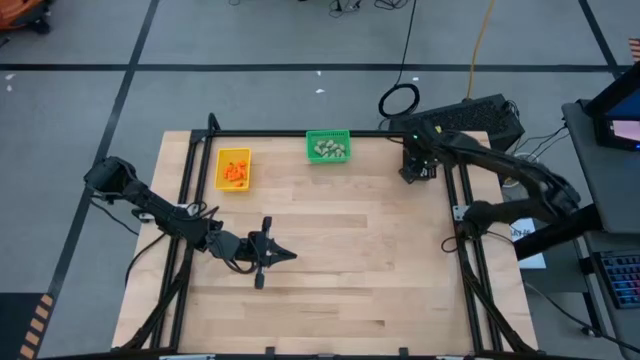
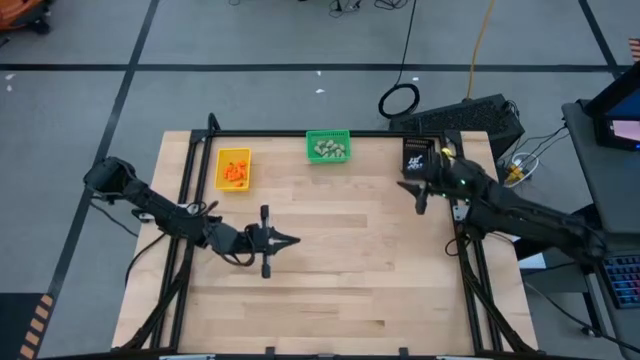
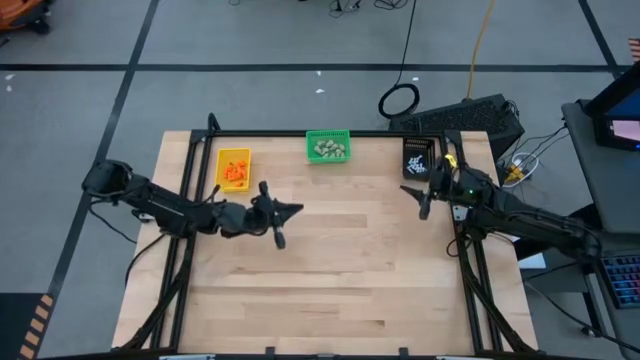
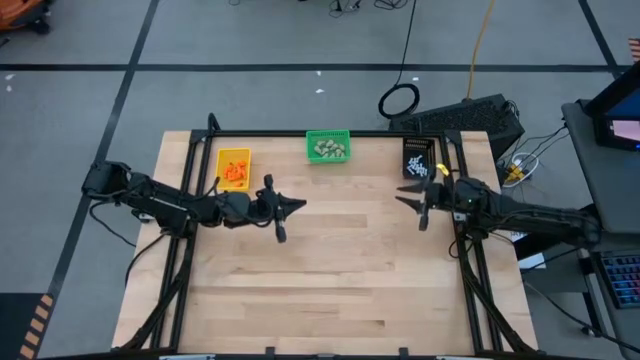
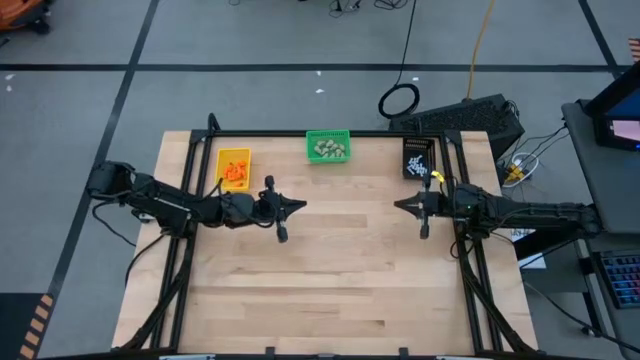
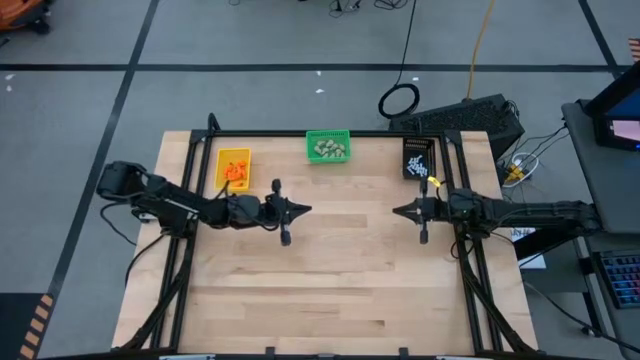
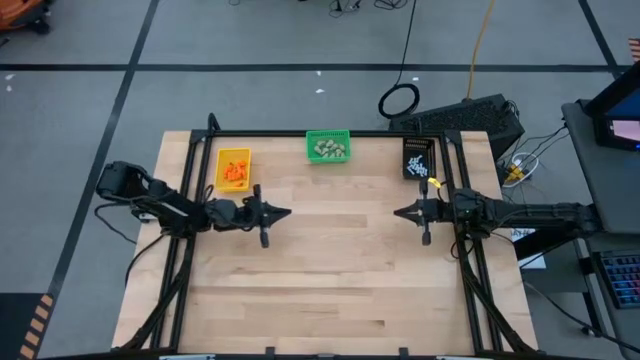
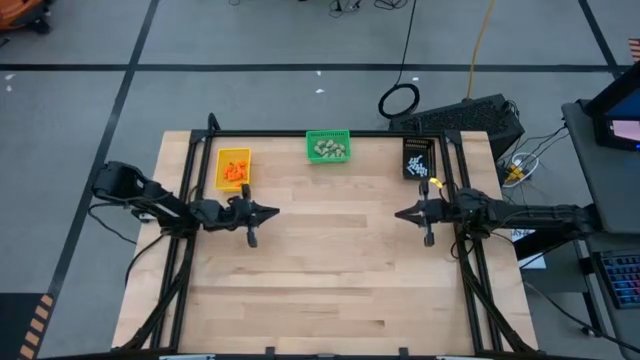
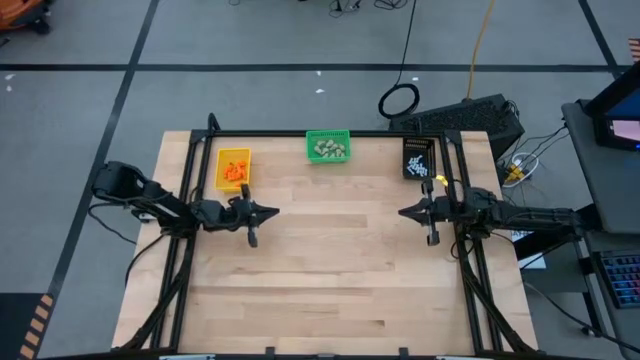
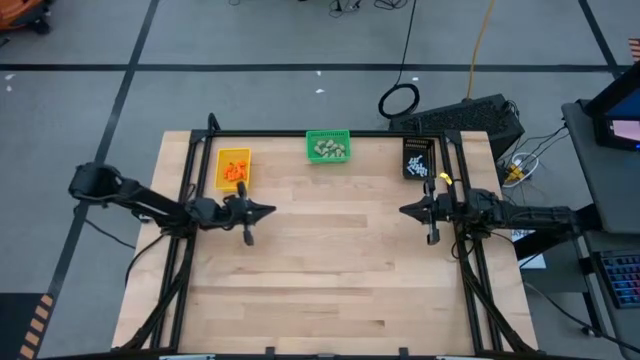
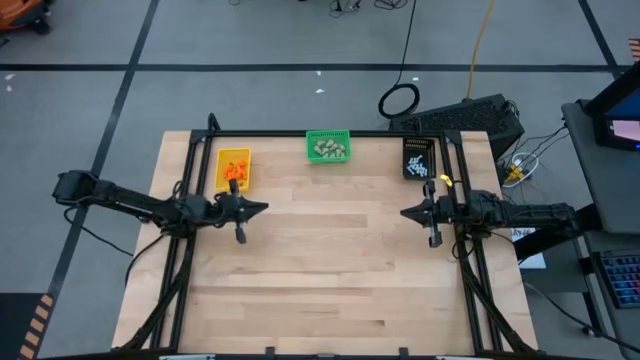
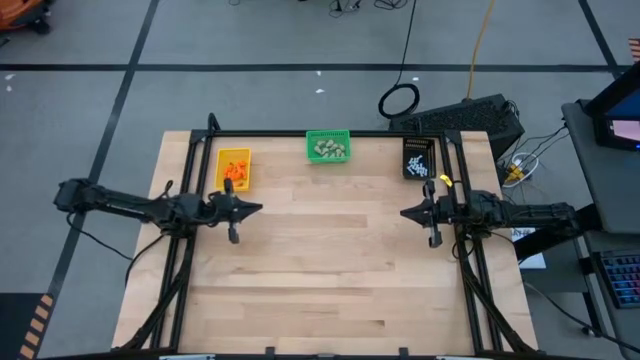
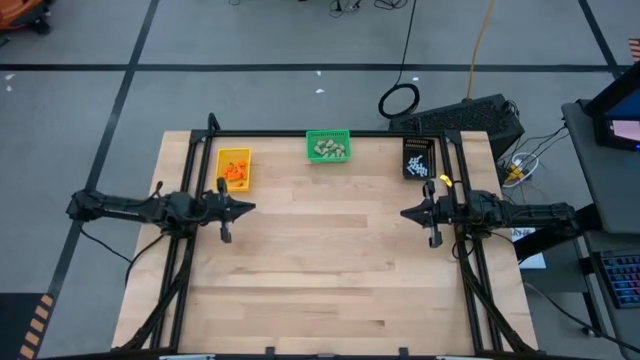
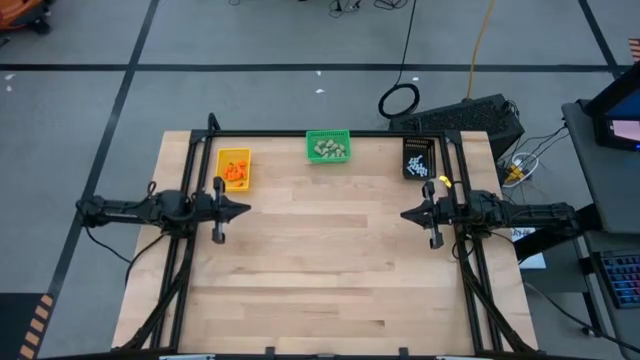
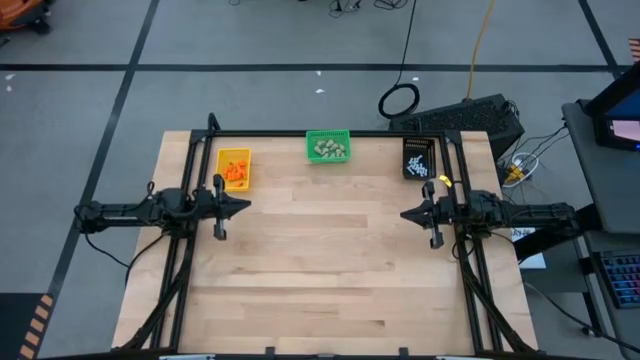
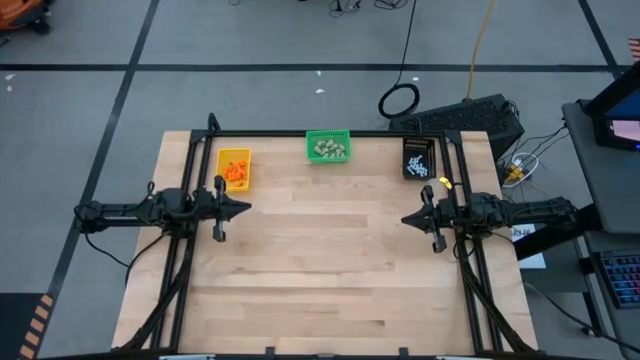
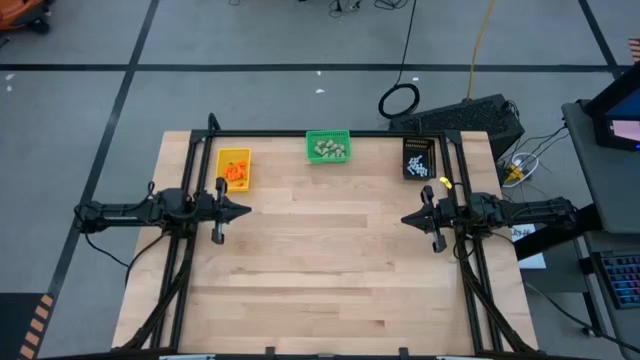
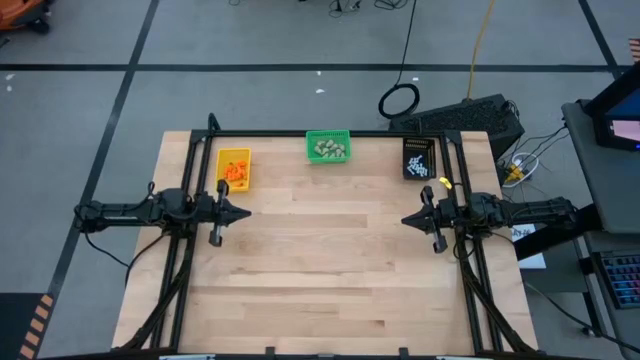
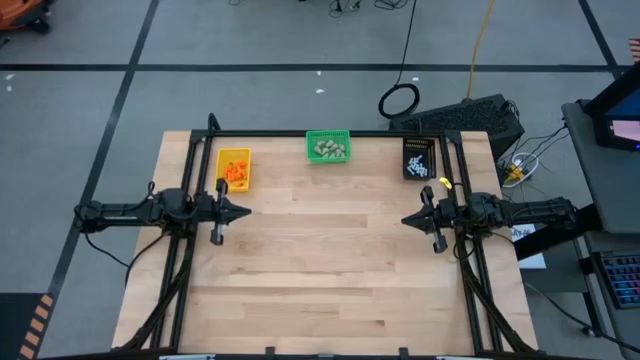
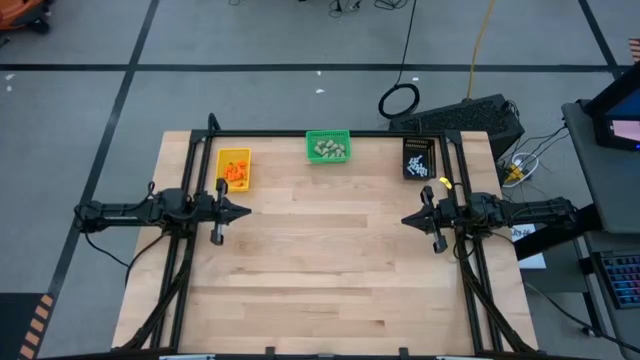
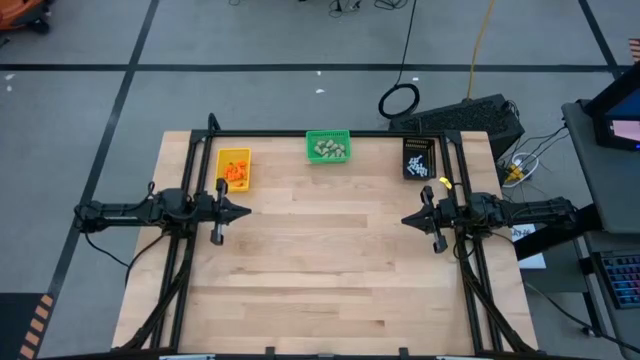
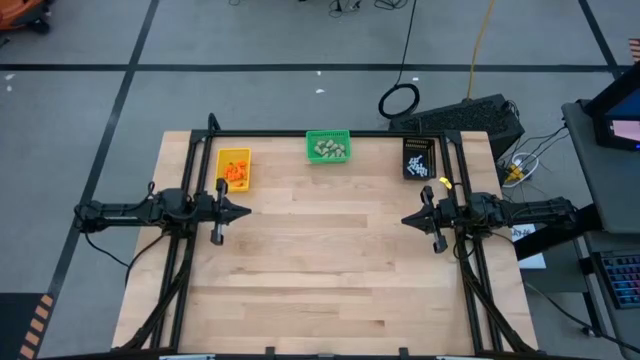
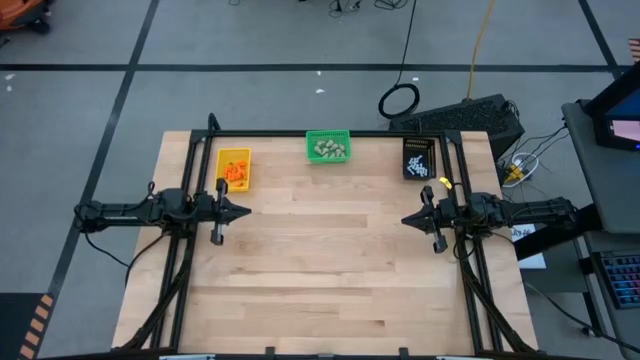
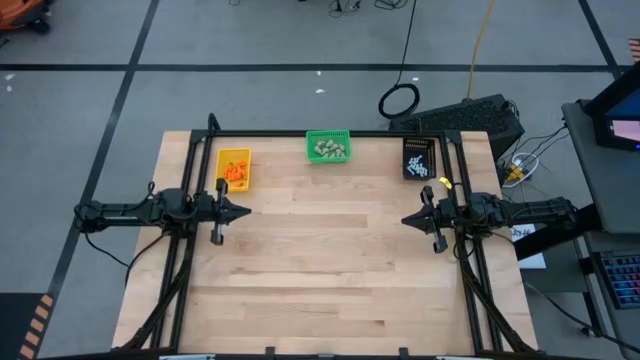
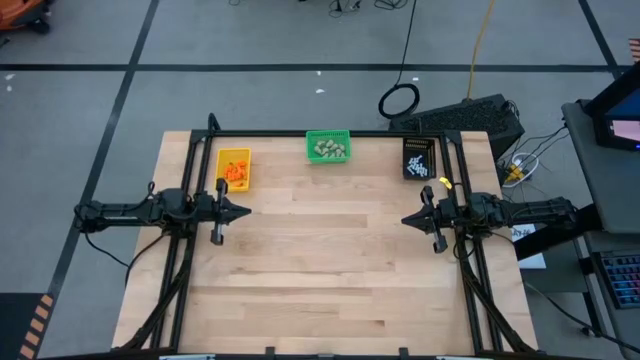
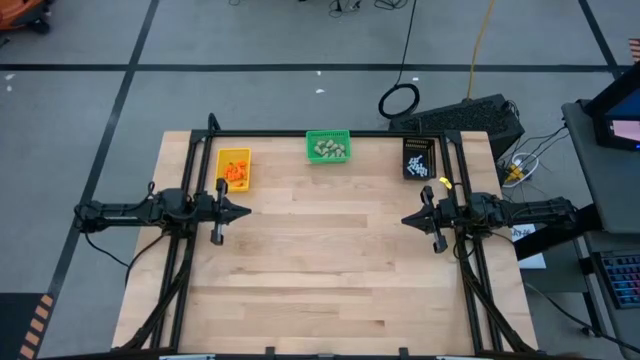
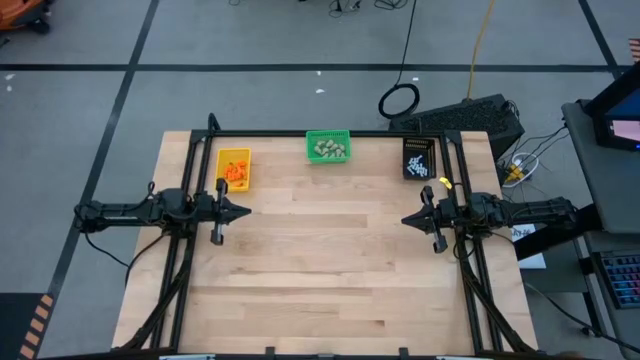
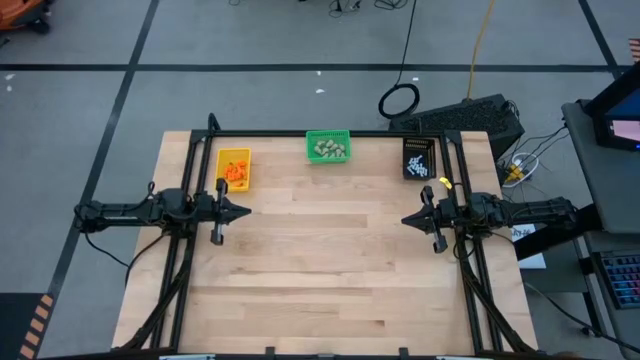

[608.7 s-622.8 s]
Task: Sort Halloween decoration
Return to Home Position

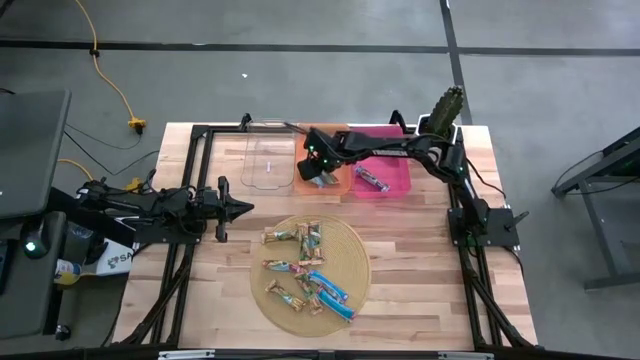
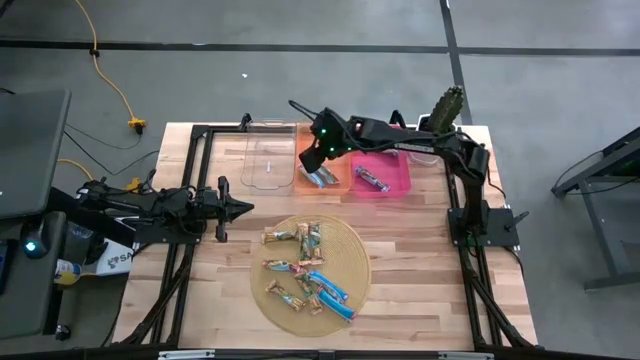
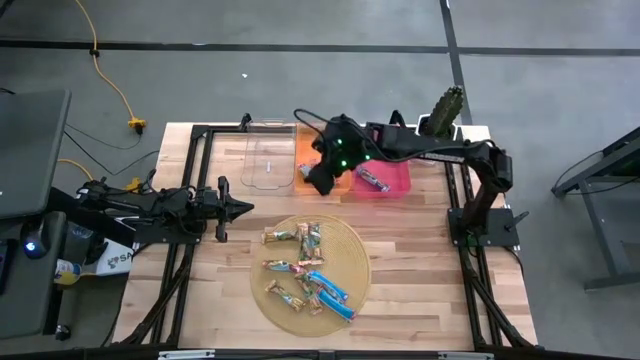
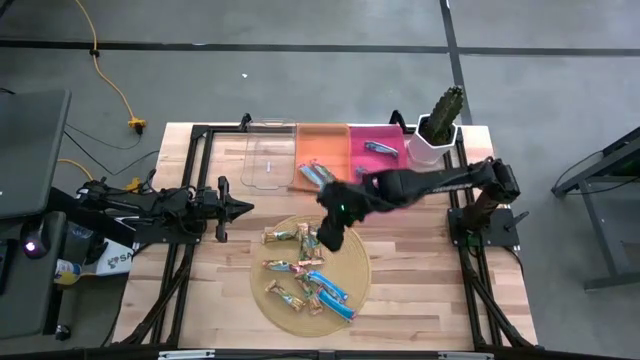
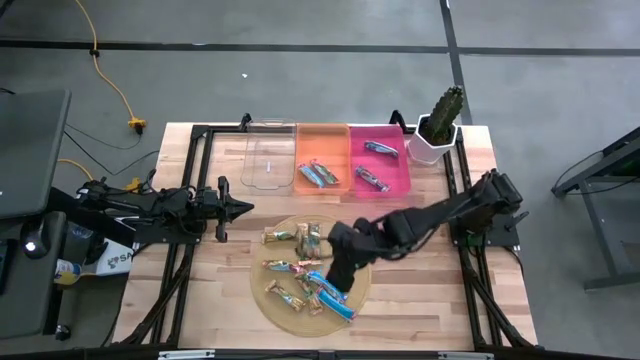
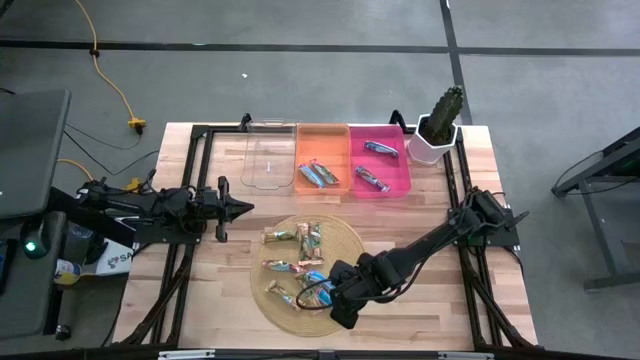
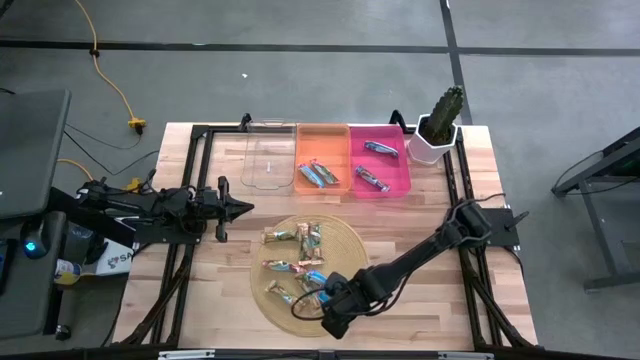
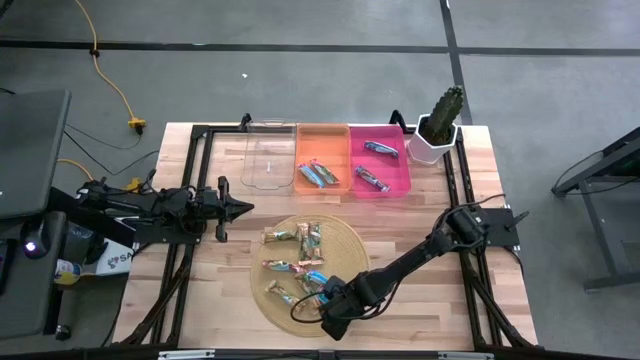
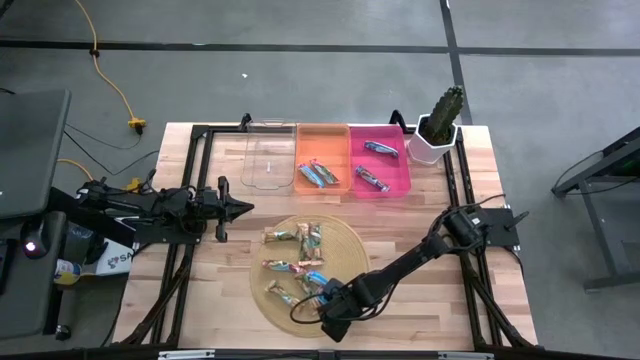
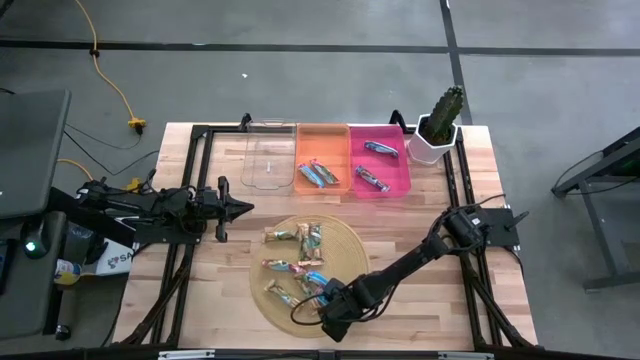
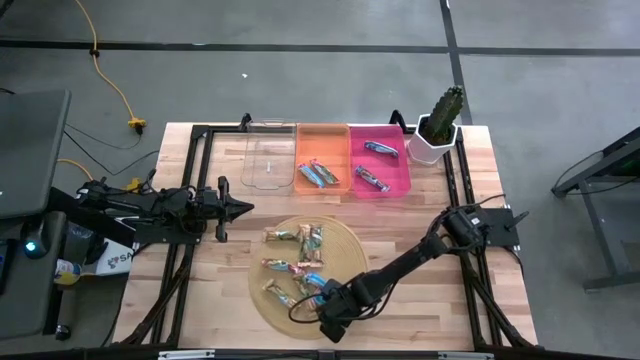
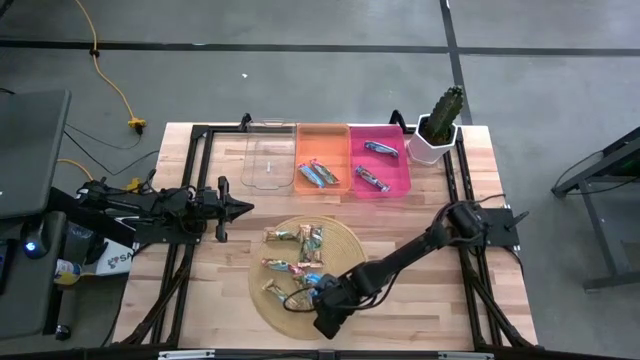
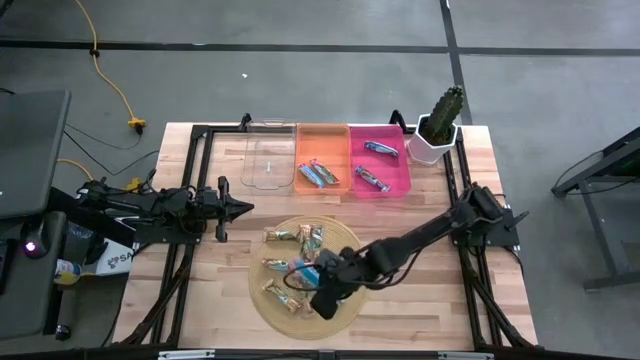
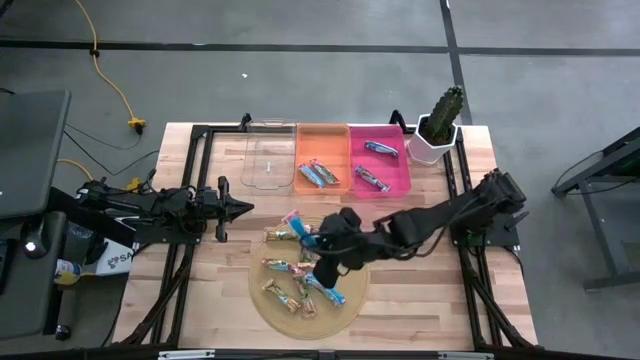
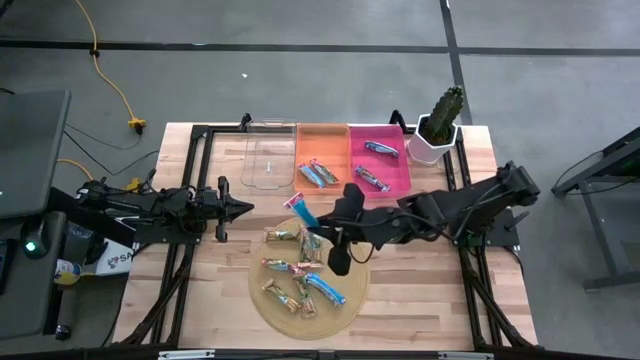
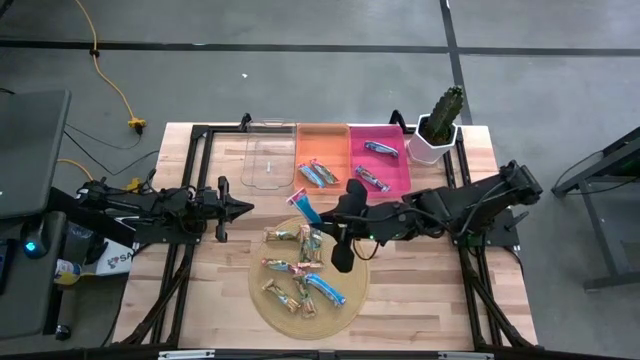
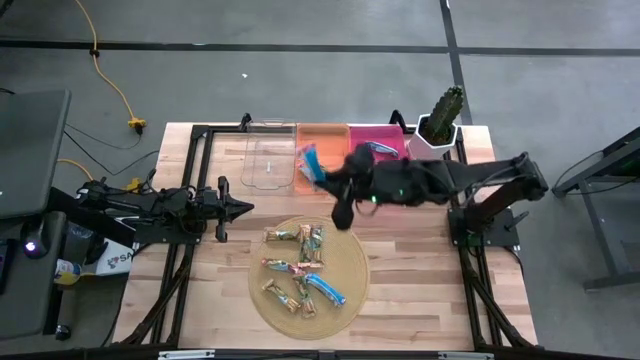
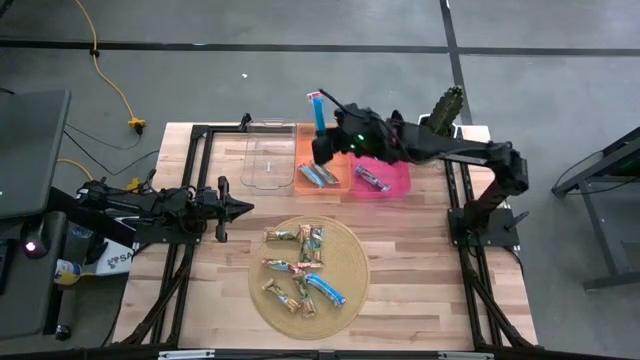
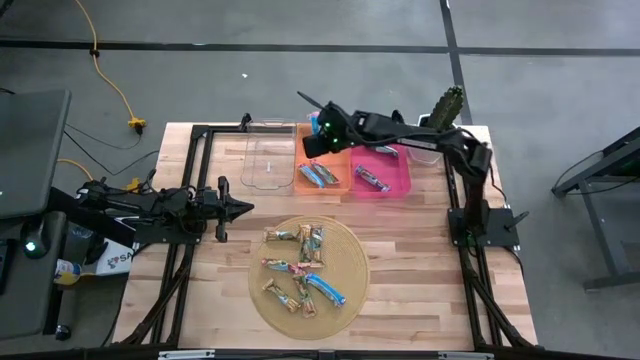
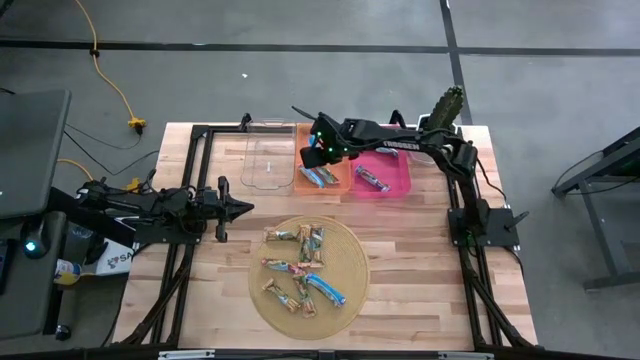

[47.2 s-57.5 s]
Task: Pick and place Granola Bars by type
Put the red granola bar into the orange bin
